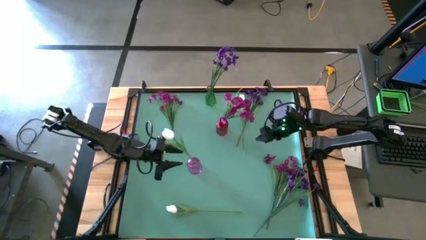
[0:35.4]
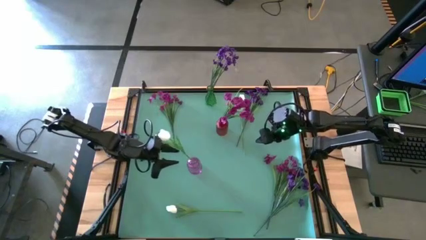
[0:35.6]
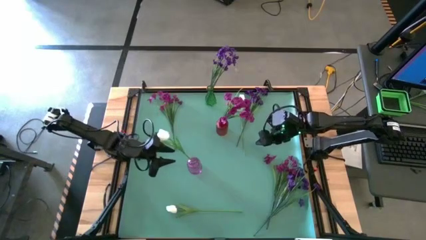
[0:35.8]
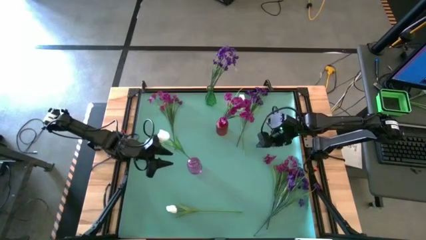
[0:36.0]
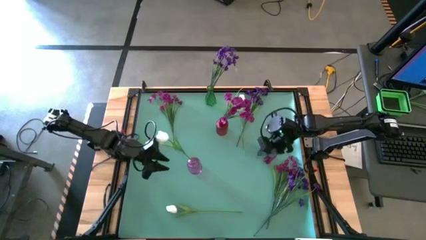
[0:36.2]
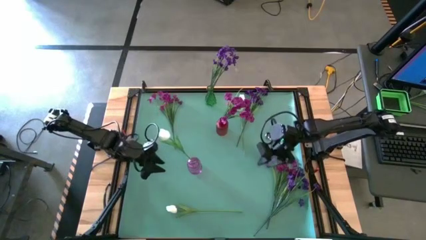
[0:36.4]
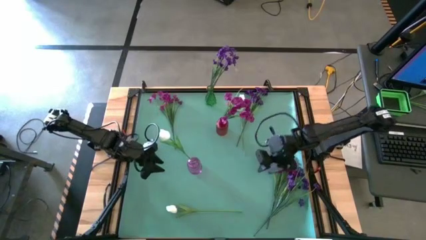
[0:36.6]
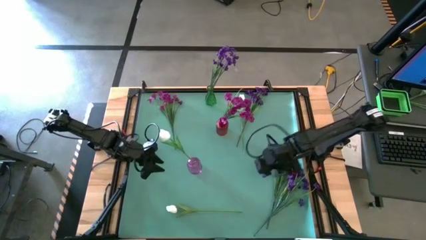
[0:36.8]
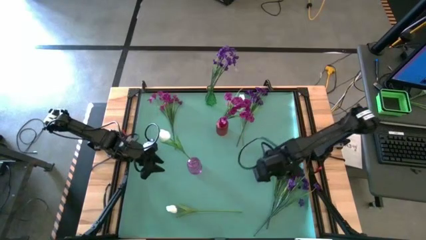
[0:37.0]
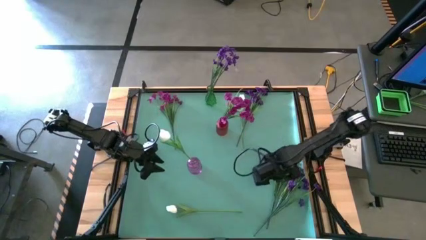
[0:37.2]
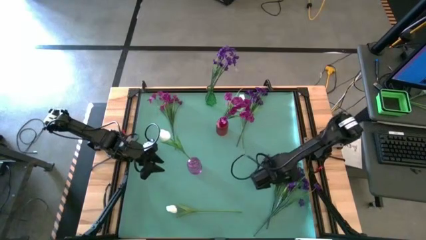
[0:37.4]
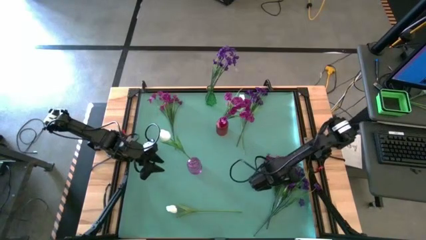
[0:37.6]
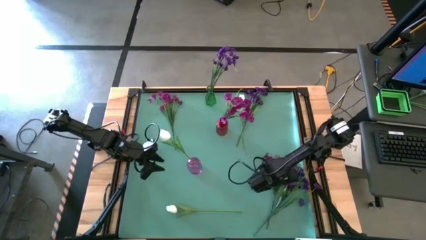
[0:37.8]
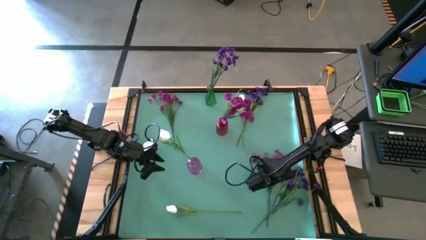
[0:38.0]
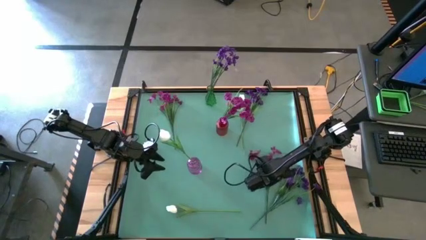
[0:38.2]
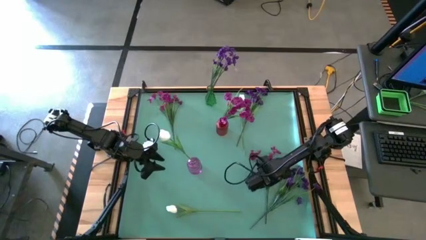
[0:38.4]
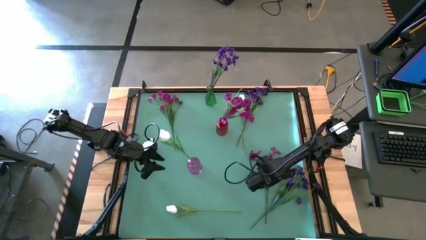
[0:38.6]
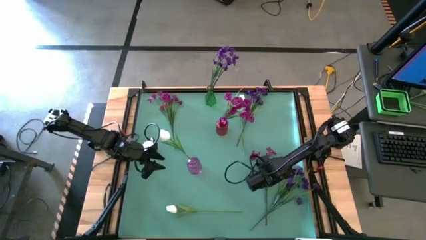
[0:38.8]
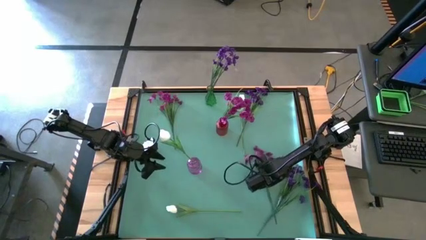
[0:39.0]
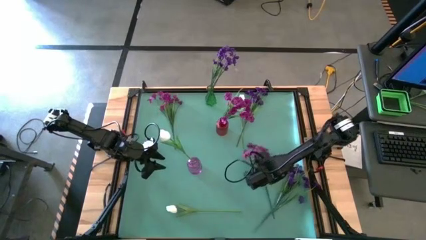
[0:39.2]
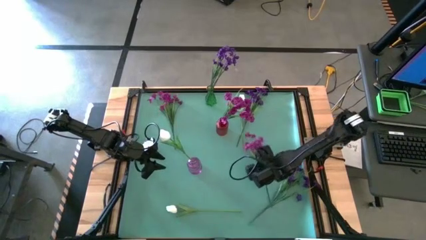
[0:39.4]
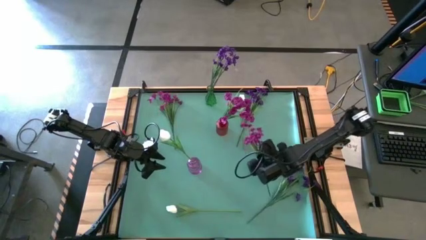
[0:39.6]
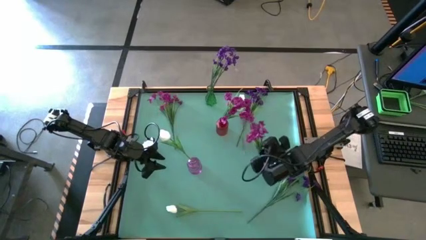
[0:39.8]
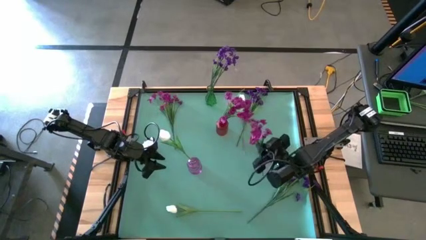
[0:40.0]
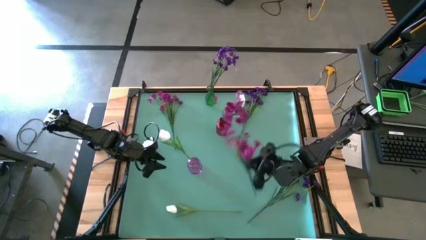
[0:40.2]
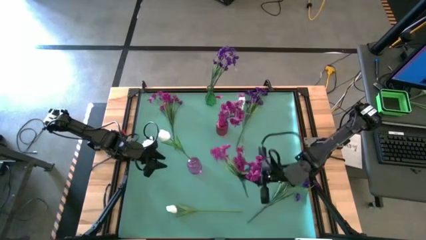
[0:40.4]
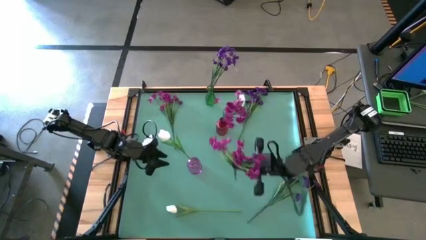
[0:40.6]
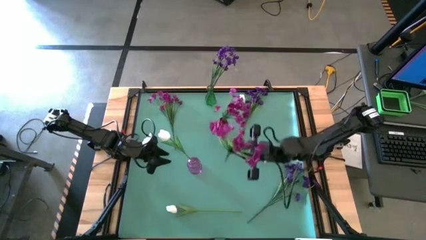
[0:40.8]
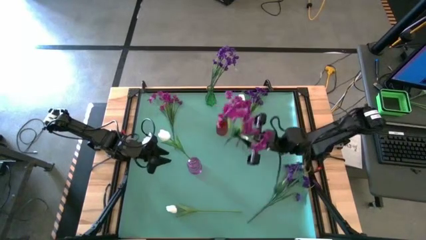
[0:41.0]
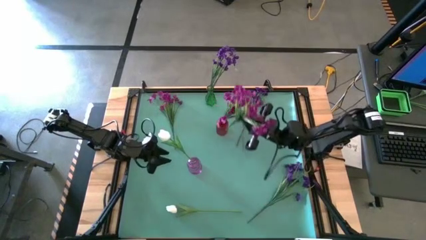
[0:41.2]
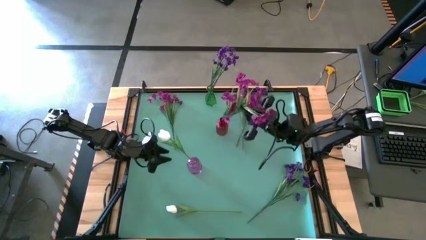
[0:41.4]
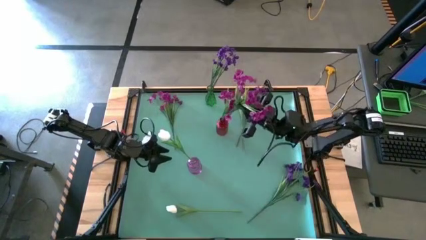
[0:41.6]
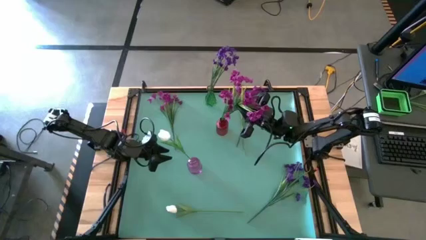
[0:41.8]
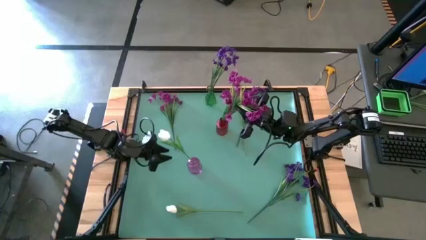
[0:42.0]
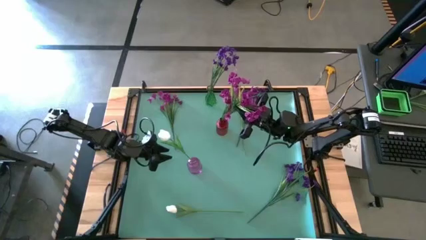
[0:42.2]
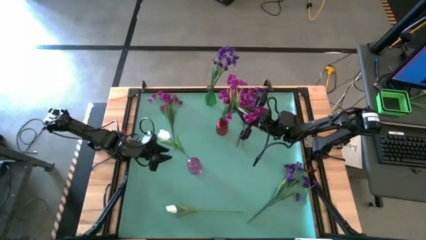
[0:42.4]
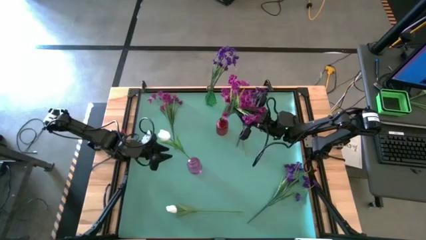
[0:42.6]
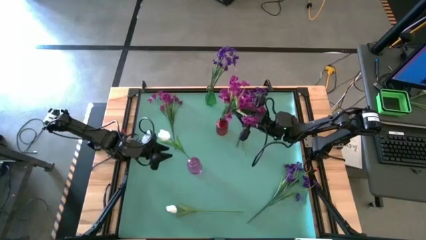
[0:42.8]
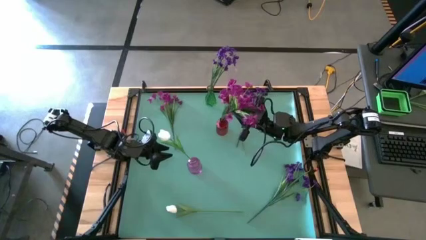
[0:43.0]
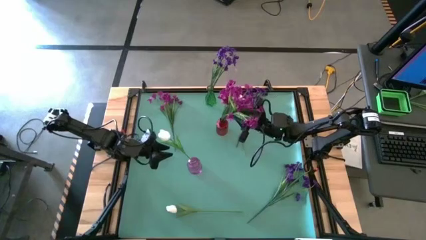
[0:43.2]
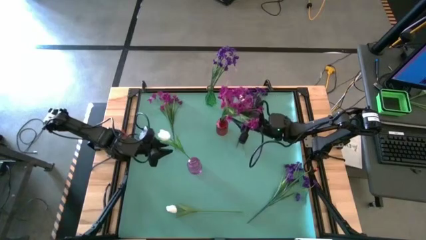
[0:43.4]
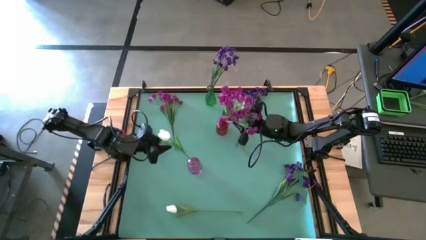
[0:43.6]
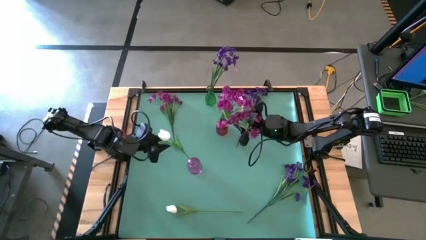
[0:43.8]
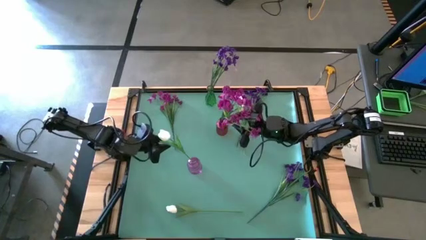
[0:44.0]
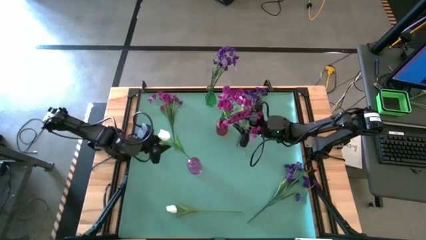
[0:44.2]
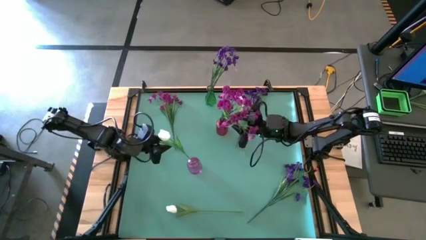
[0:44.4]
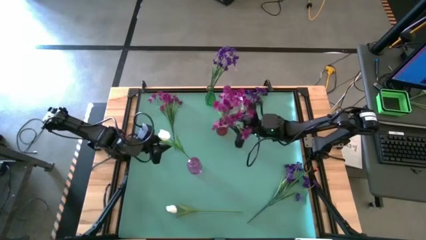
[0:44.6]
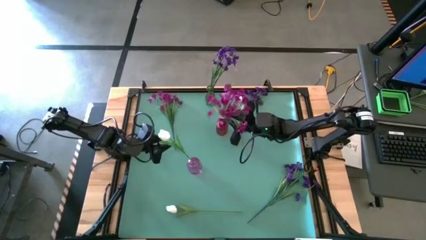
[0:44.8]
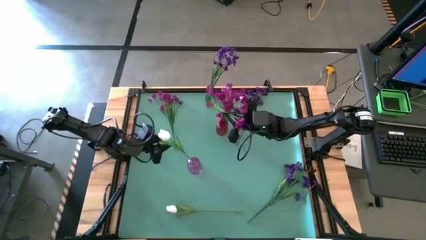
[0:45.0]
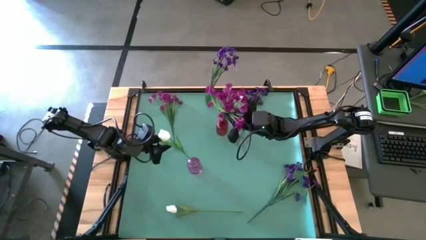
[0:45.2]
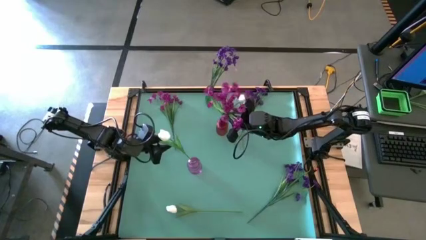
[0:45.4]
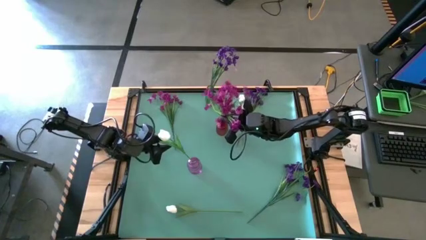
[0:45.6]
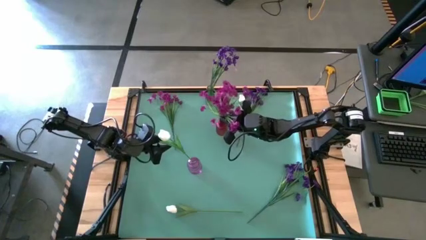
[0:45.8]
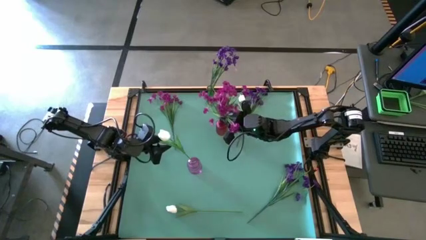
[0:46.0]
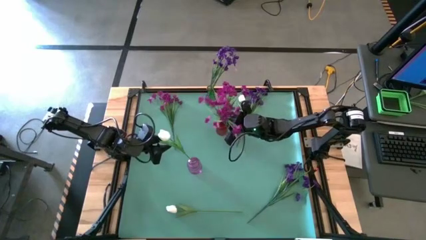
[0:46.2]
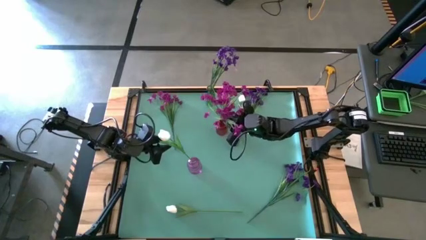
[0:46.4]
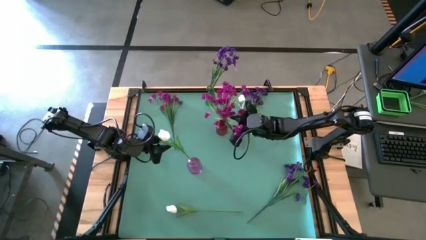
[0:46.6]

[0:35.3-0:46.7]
Task: Sort flowers into vase by color
Put the bottom pink flower into the red vase
